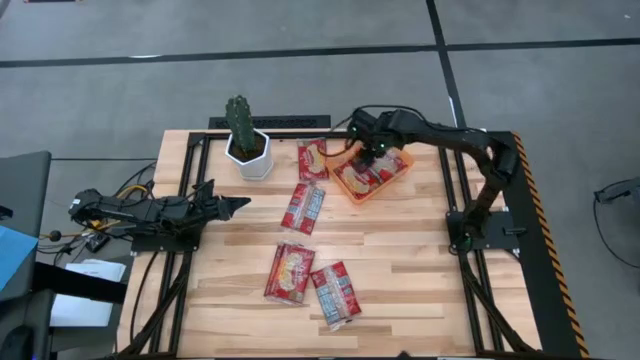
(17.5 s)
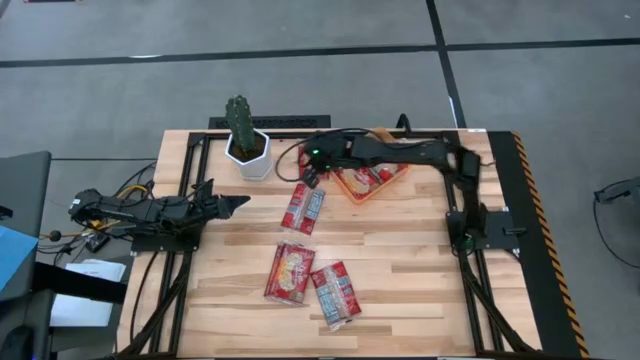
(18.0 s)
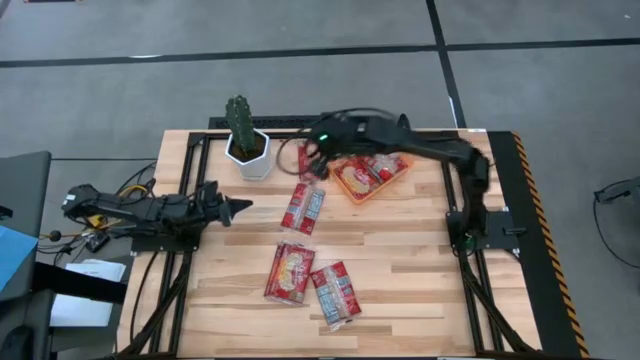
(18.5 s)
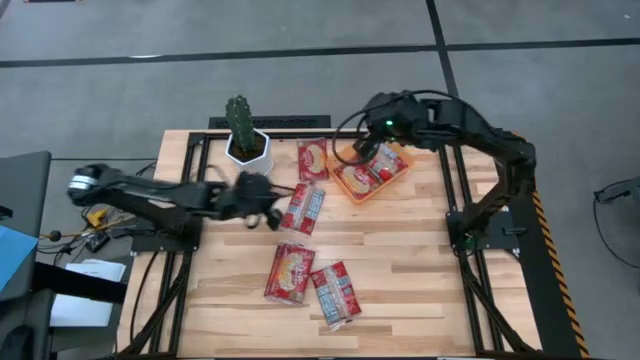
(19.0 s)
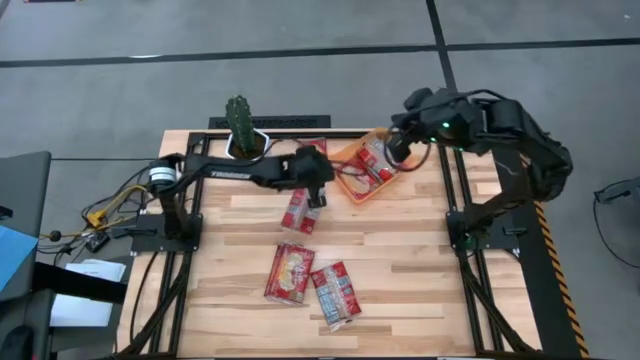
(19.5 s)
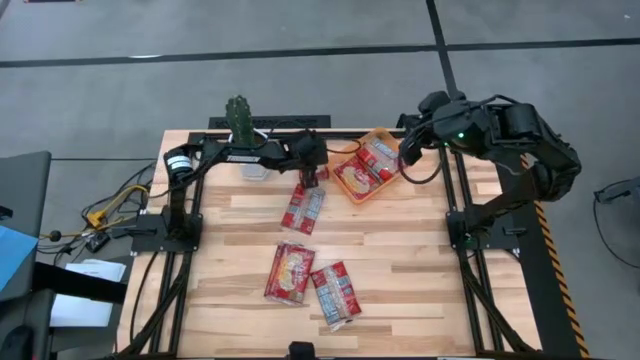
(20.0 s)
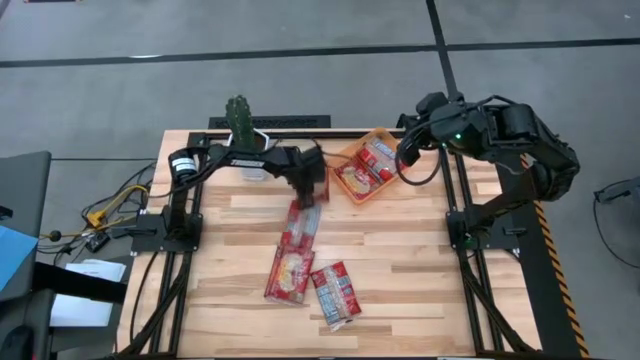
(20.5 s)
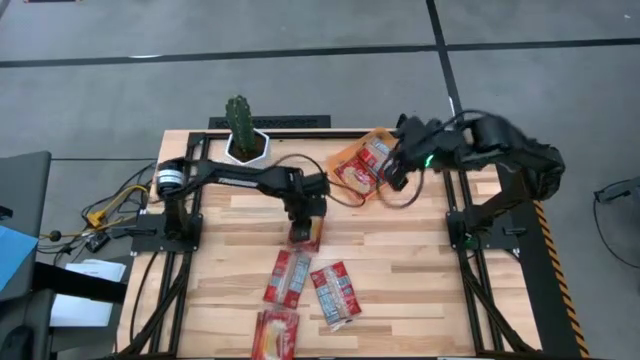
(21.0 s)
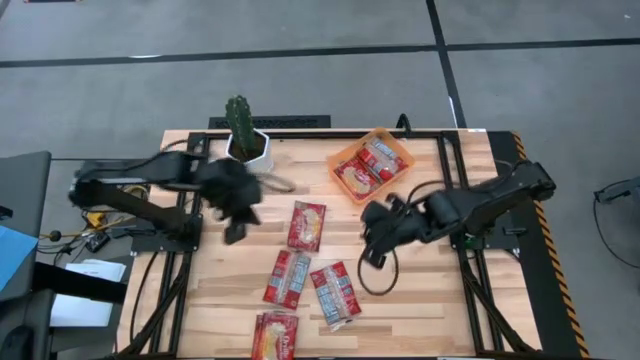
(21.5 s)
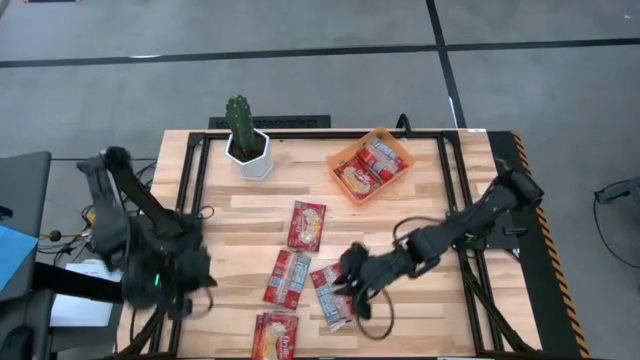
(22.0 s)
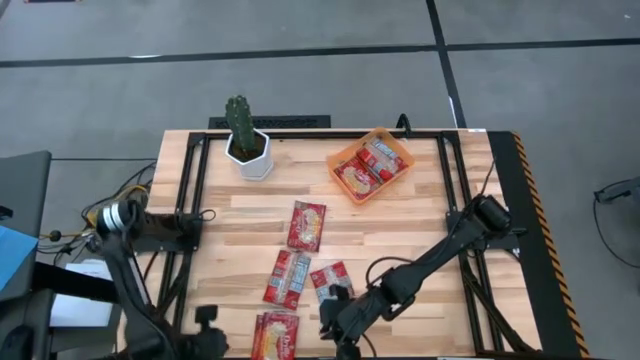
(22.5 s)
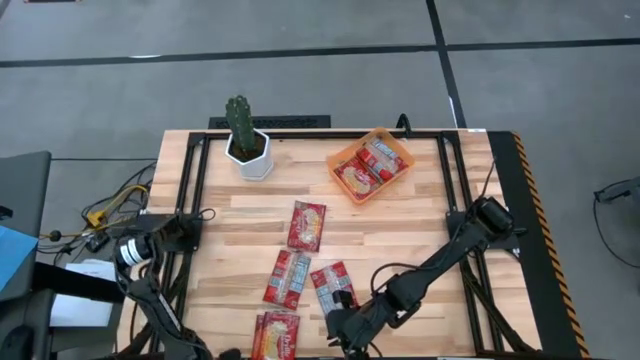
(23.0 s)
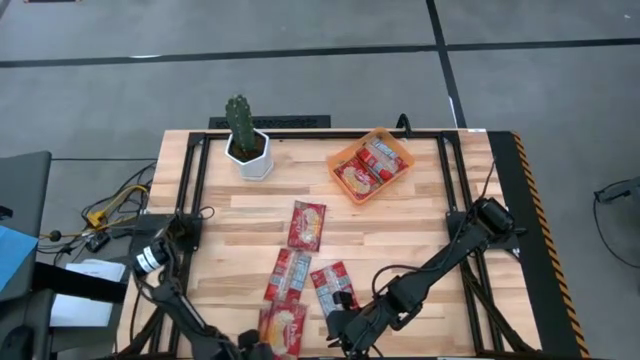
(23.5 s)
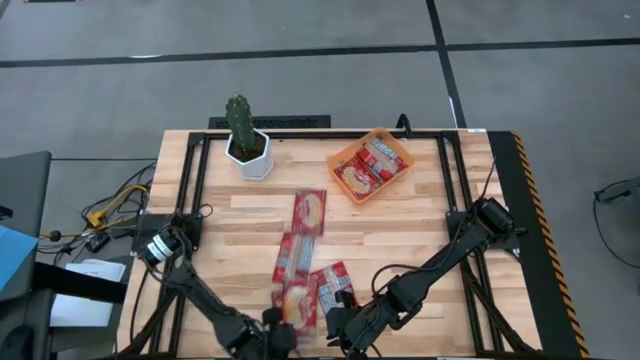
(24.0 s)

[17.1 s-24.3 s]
Task: Sort popcorn bags into baskets
Adjust the popcorn bag

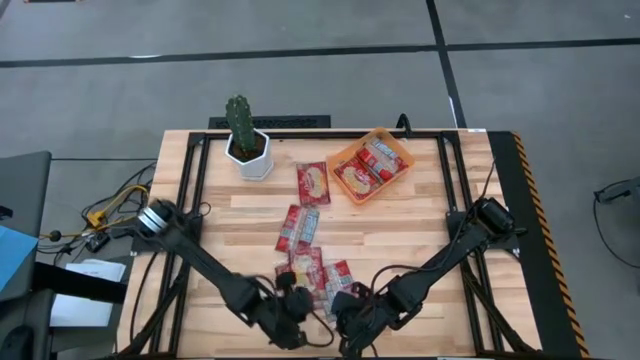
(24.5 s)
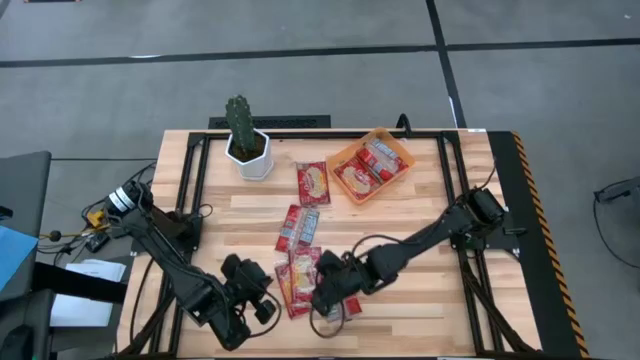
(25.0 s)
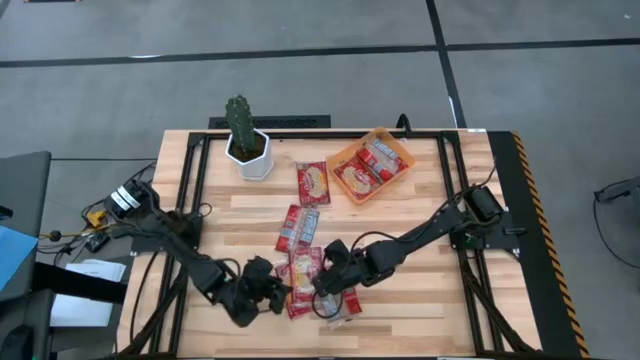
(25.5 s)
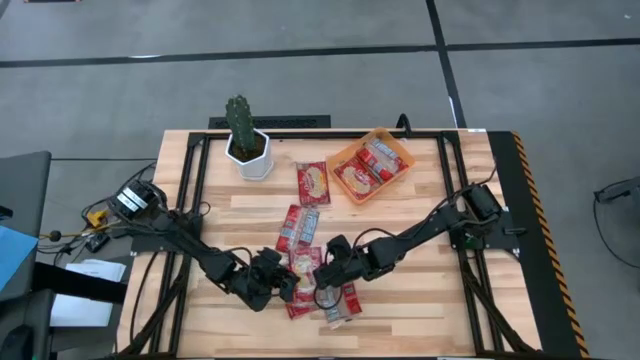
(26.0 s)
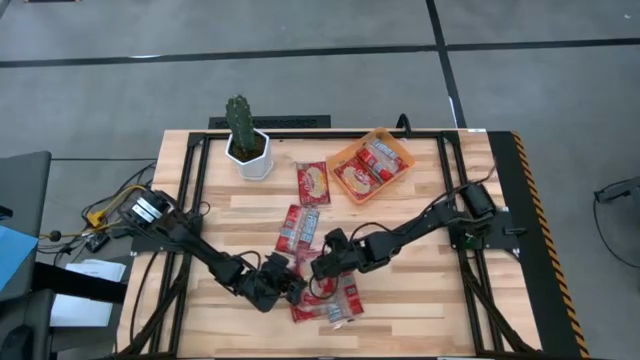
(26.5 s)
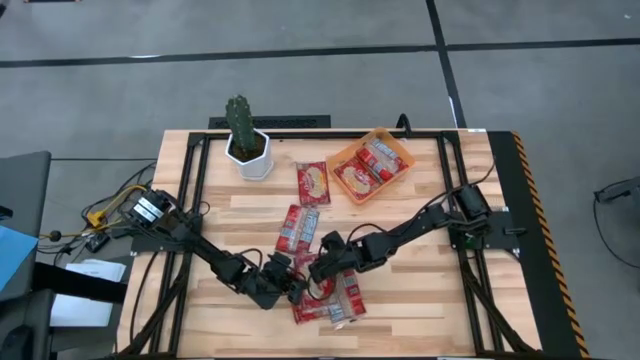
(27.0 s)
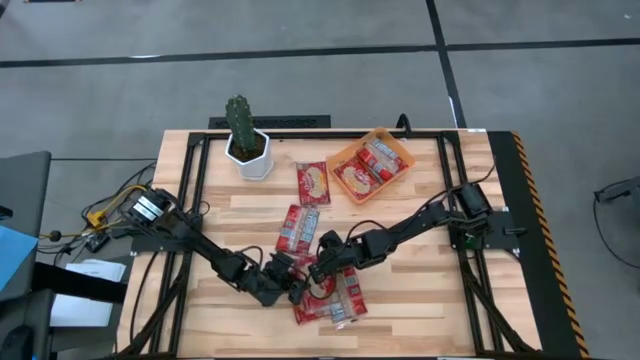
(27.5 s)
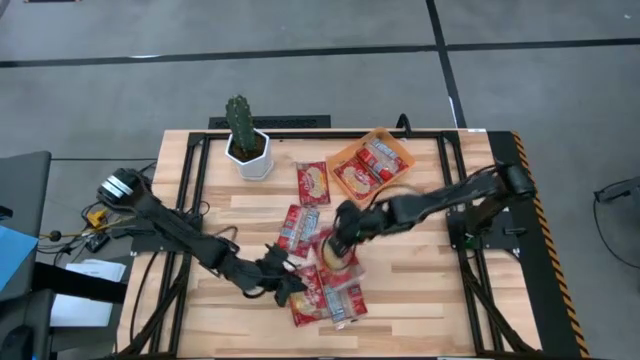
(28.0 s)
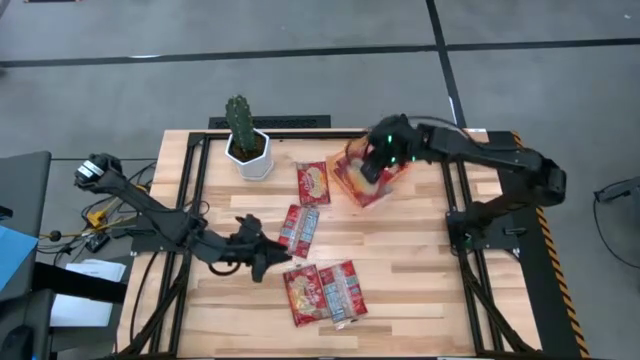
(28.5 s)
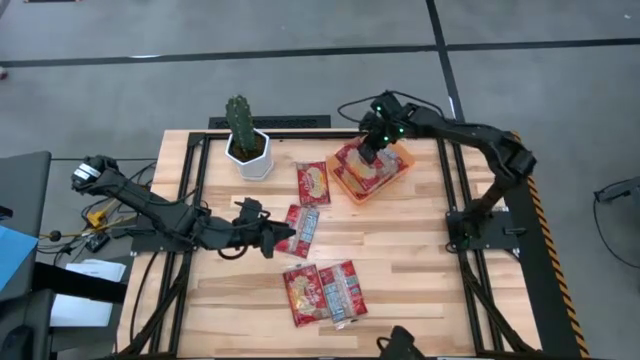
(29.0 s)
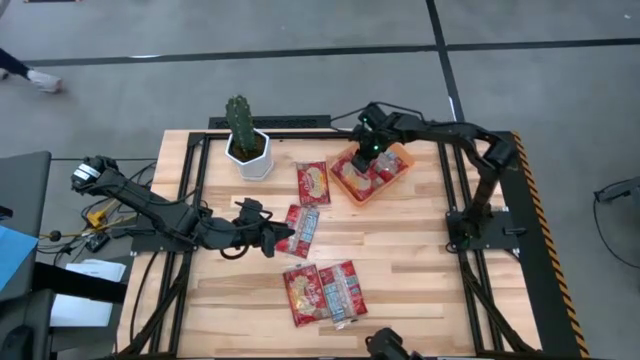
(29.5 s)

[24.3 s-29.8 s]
Put the popcorn bag into the orange bin

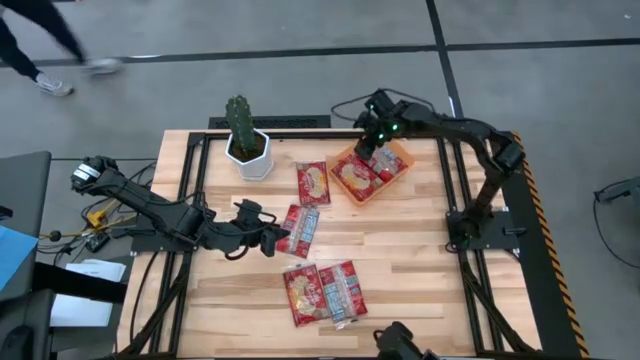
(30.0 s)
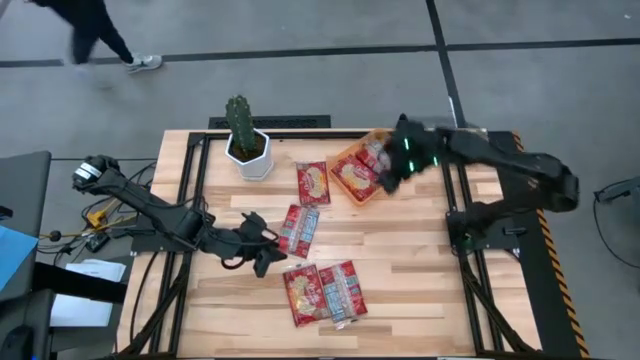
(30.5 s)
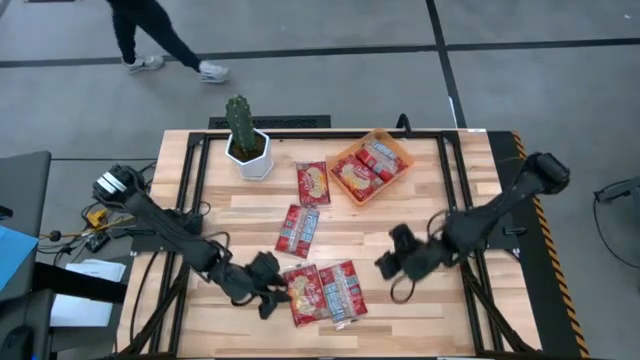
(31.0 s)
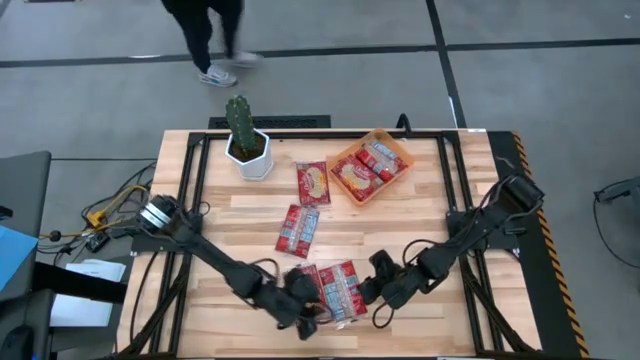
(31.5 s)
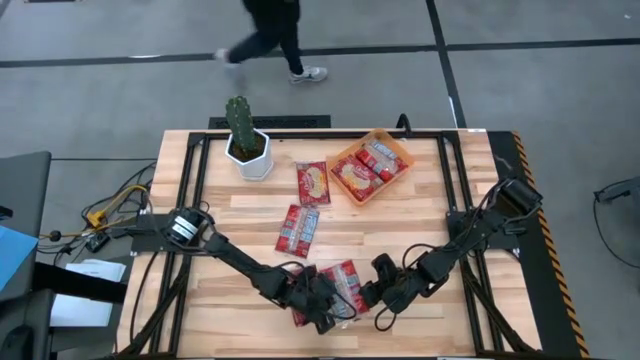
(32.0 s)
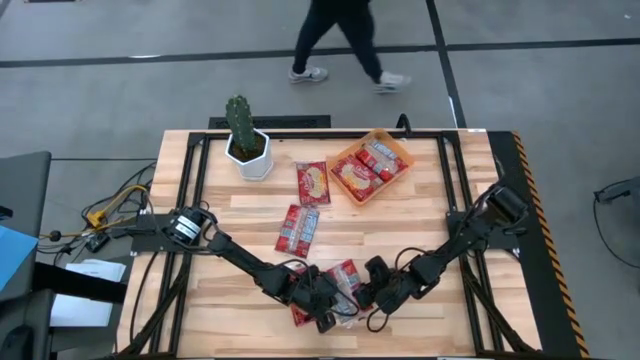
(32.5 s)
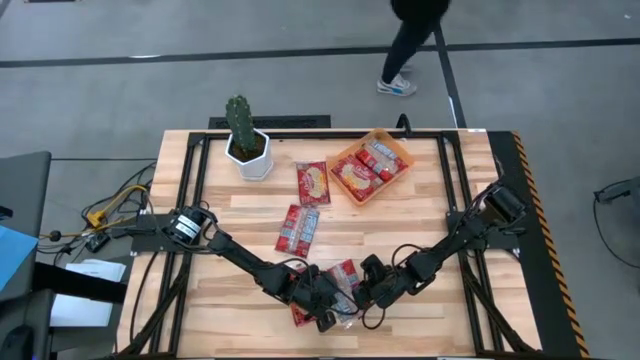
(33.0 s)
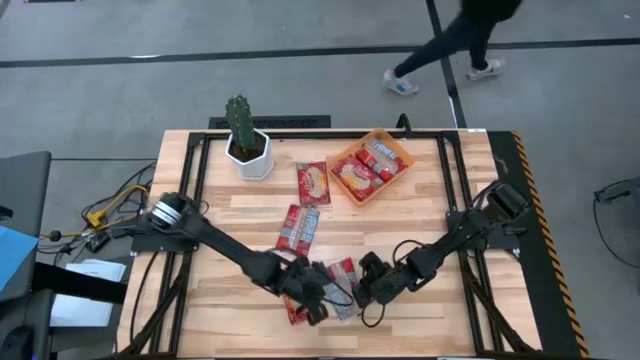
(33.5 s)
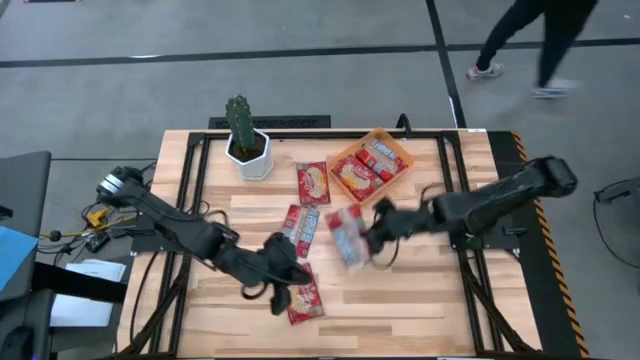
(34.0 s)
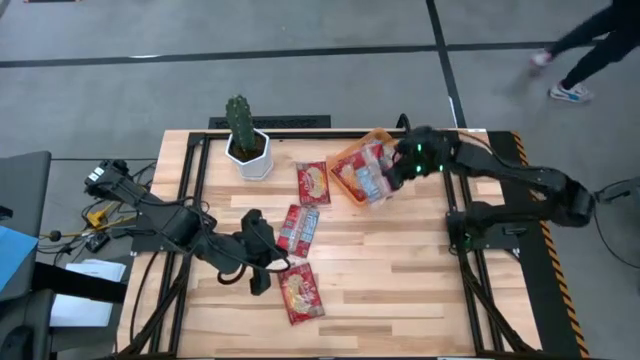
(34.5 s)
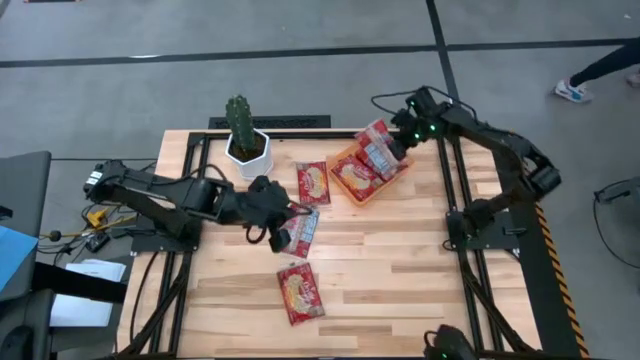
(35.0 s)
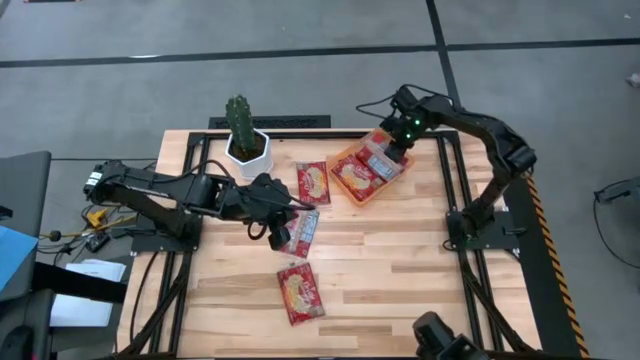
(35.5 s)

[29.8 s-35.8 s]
Put the popcorn bag into the orange bin

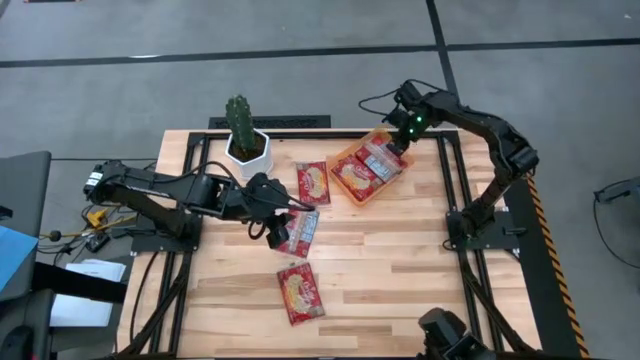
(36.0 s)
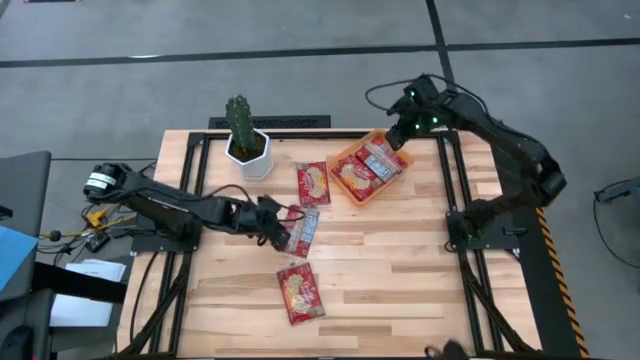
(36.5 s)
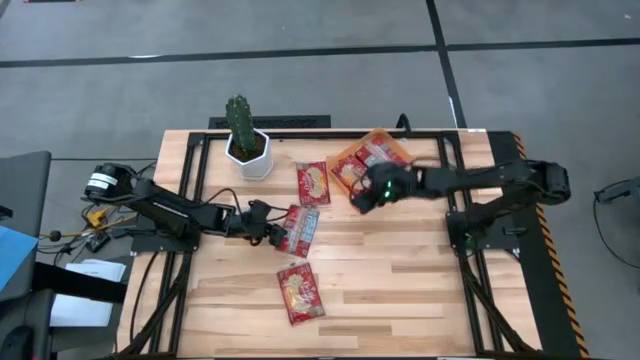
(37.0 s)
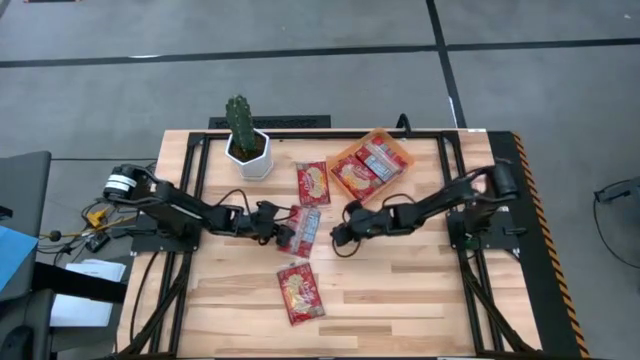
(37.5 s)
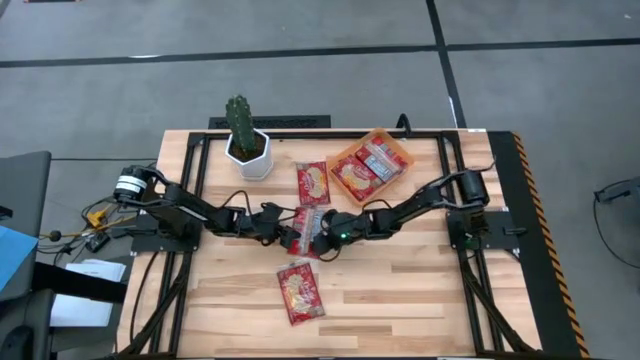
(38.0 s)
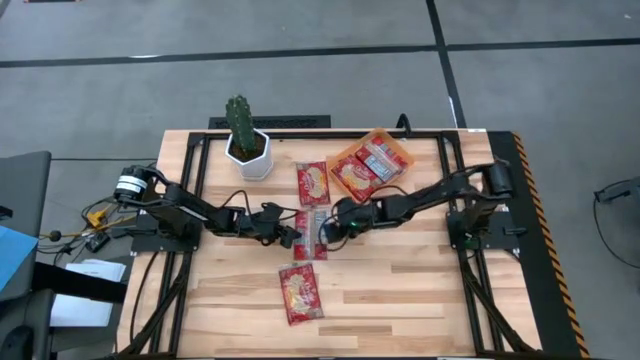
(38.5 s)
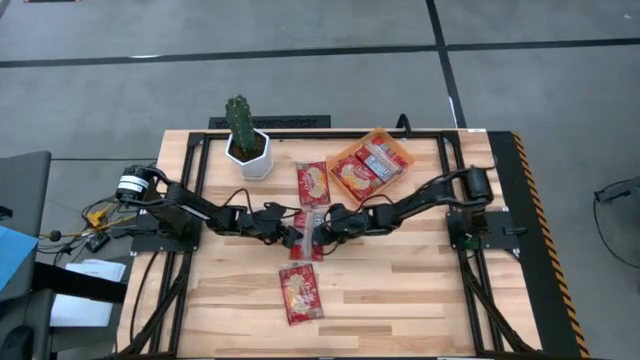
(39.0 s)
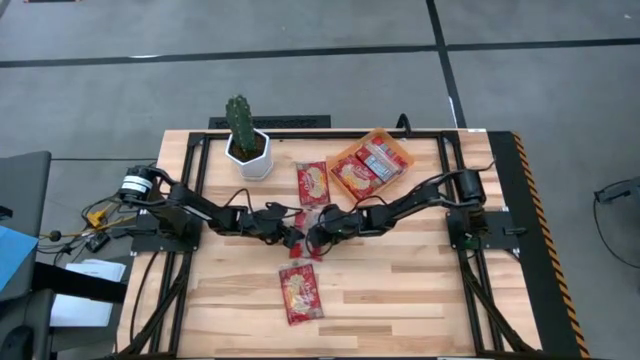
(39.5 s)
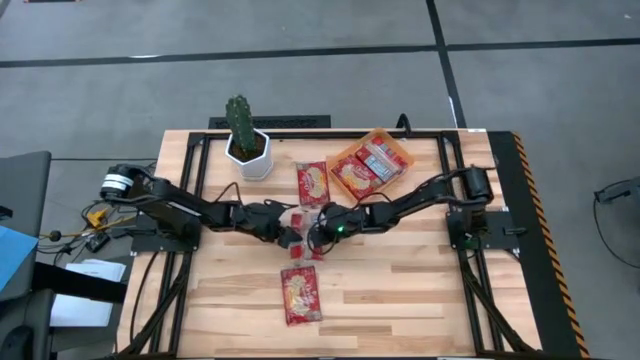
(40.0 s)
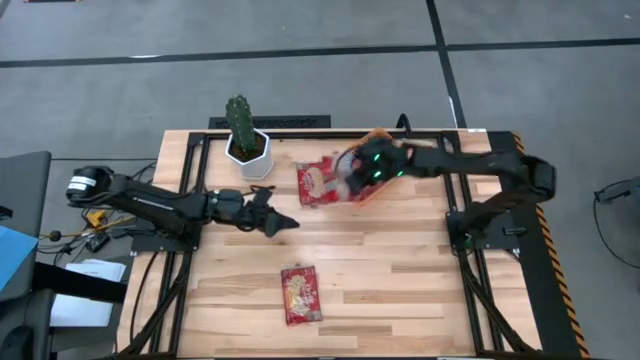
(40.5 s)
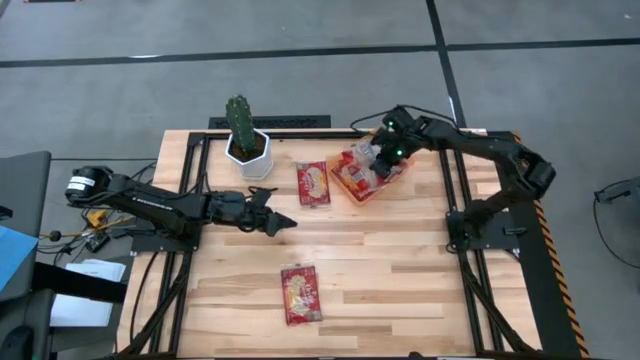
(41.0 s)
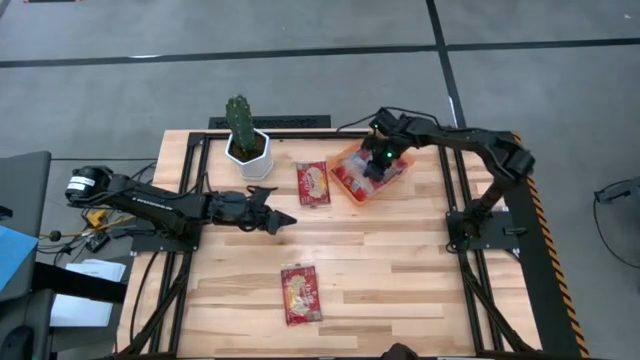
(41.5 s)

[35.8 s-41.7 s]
Put the popcorn bag into the orange bin
